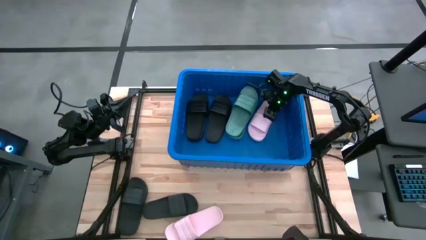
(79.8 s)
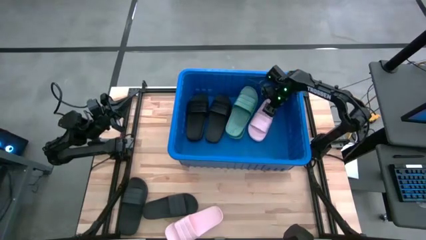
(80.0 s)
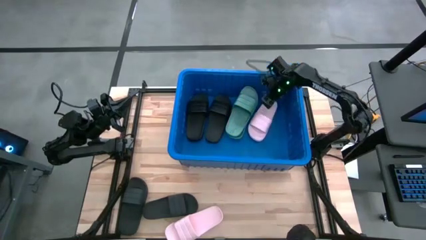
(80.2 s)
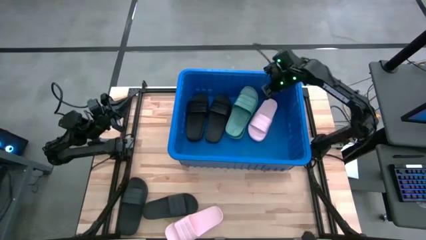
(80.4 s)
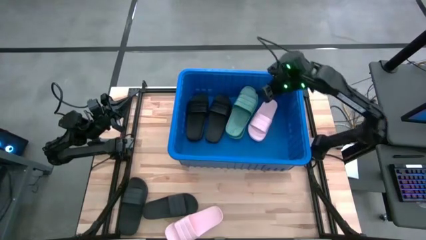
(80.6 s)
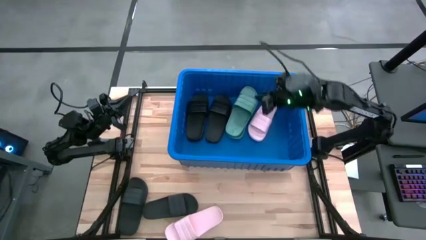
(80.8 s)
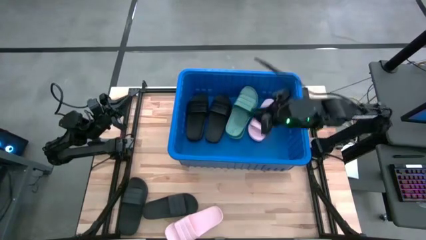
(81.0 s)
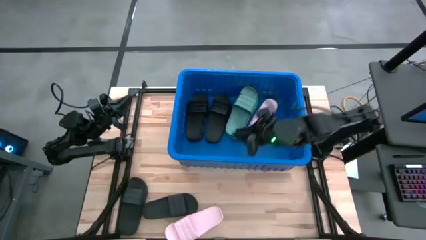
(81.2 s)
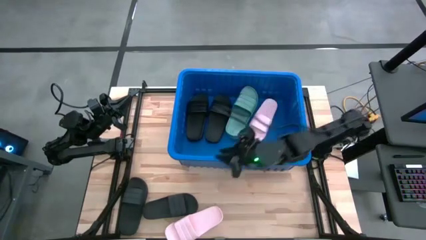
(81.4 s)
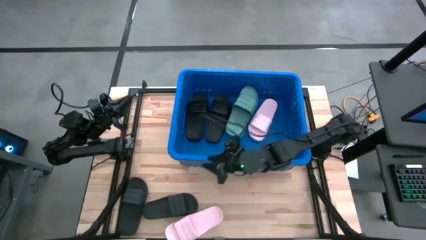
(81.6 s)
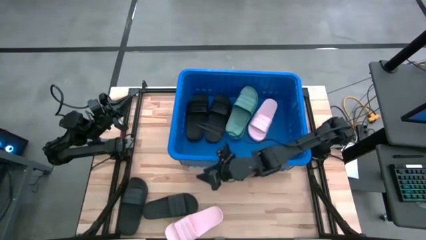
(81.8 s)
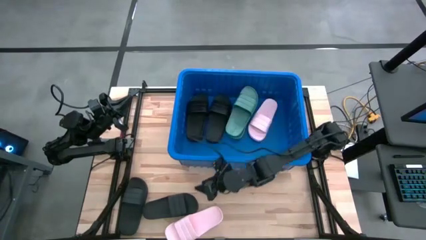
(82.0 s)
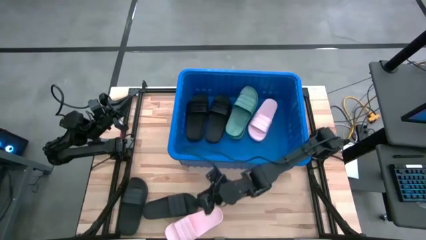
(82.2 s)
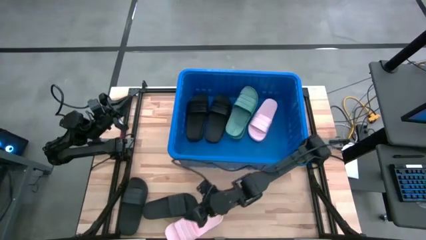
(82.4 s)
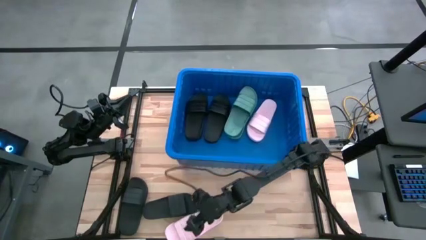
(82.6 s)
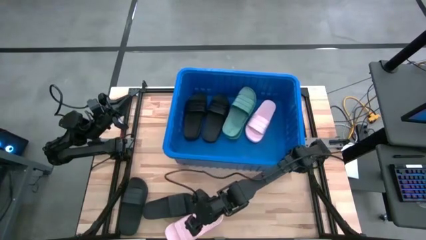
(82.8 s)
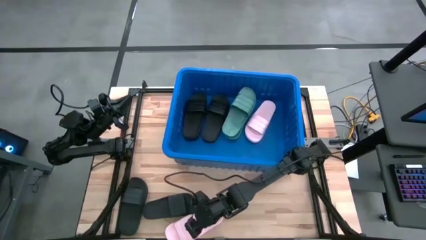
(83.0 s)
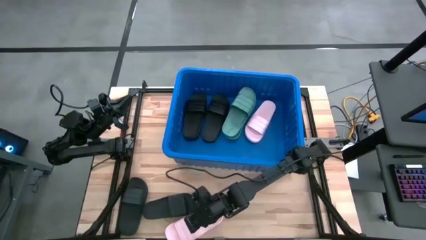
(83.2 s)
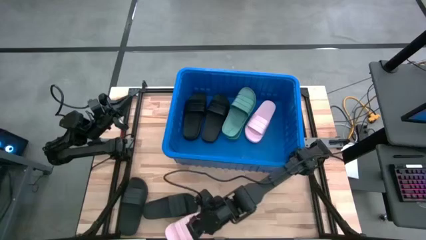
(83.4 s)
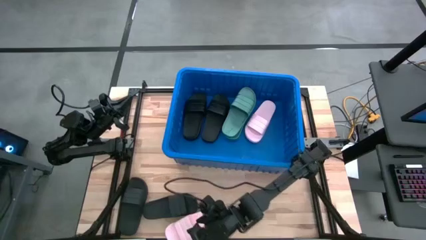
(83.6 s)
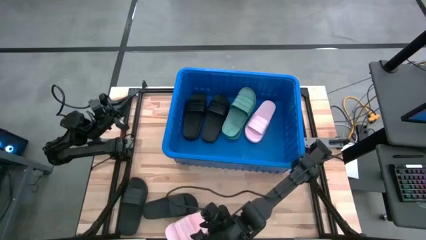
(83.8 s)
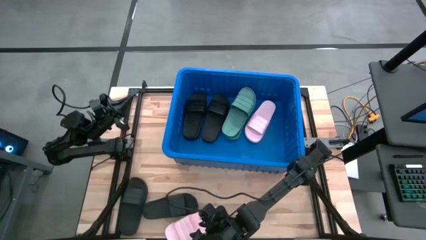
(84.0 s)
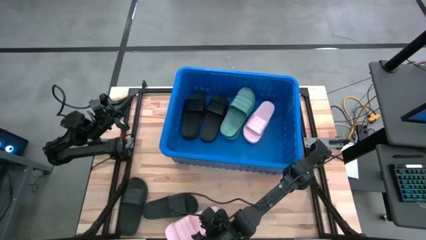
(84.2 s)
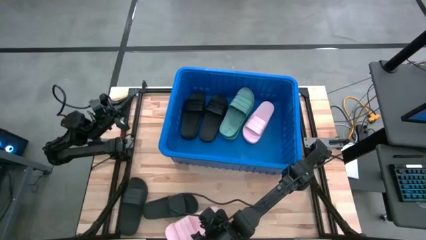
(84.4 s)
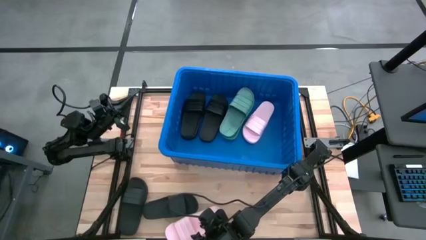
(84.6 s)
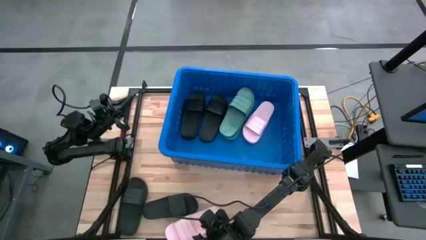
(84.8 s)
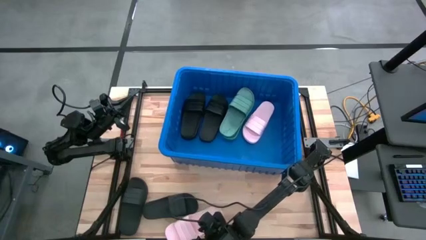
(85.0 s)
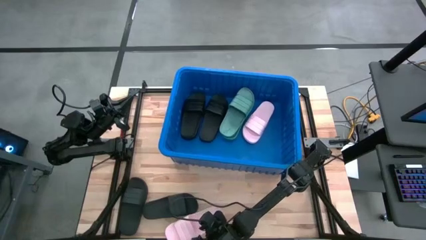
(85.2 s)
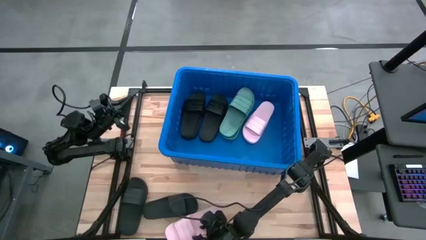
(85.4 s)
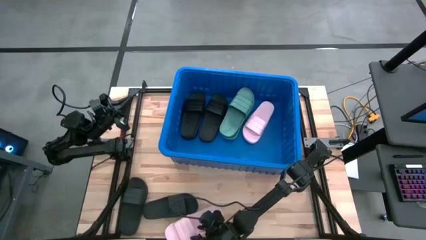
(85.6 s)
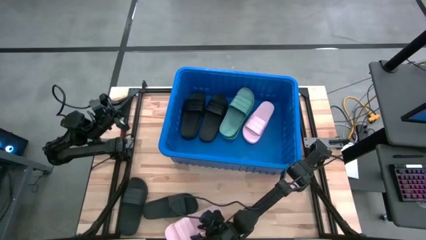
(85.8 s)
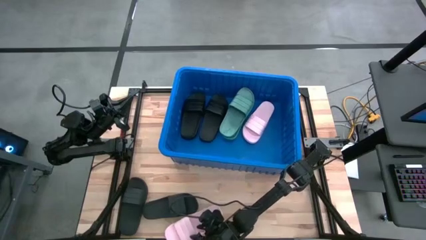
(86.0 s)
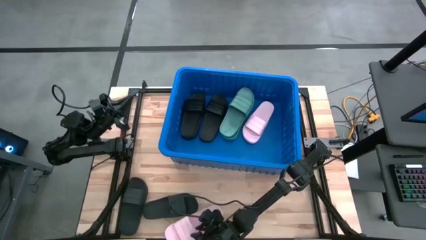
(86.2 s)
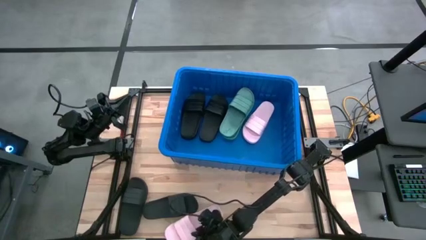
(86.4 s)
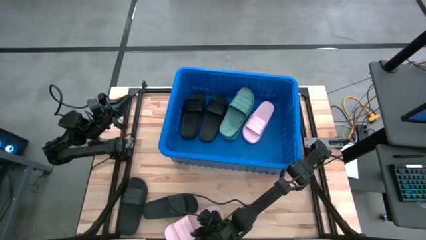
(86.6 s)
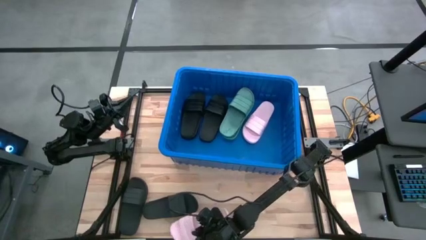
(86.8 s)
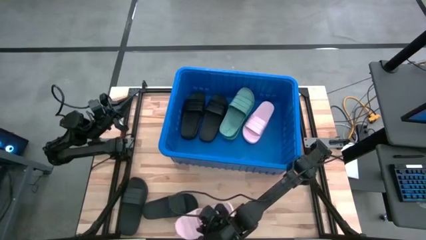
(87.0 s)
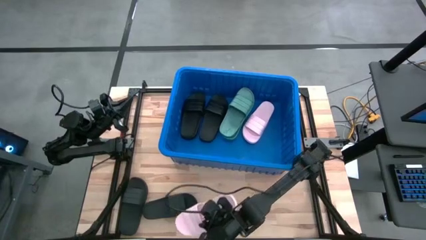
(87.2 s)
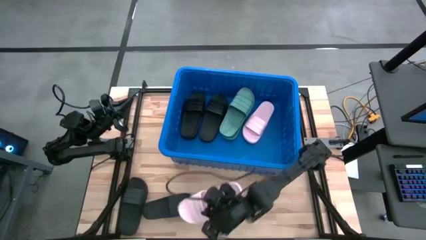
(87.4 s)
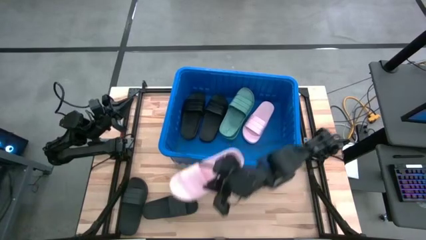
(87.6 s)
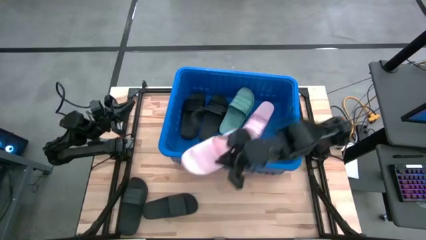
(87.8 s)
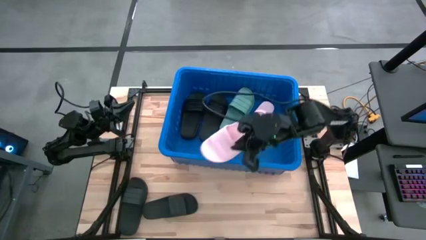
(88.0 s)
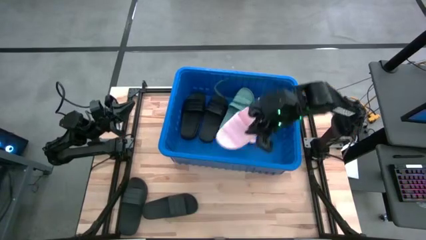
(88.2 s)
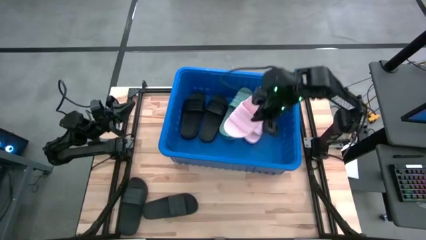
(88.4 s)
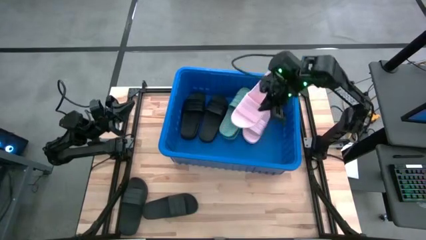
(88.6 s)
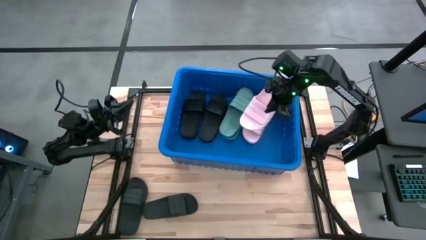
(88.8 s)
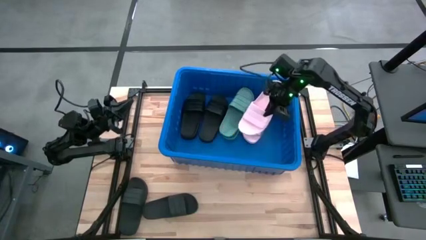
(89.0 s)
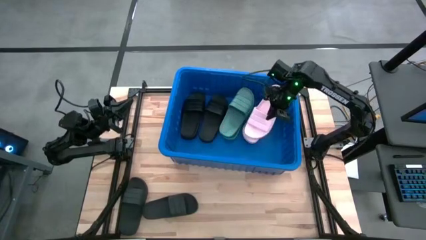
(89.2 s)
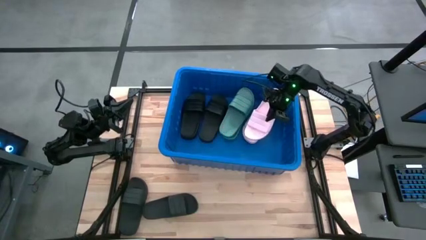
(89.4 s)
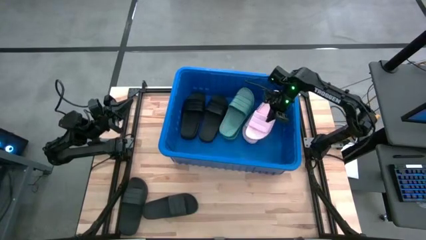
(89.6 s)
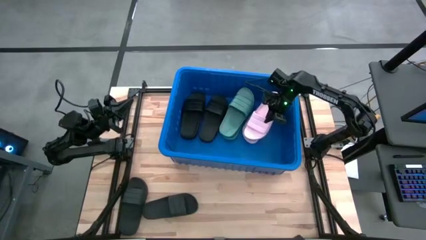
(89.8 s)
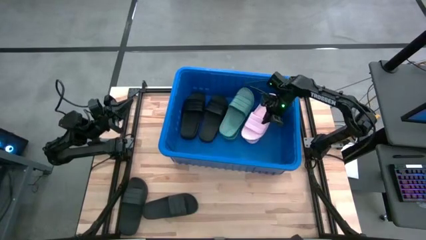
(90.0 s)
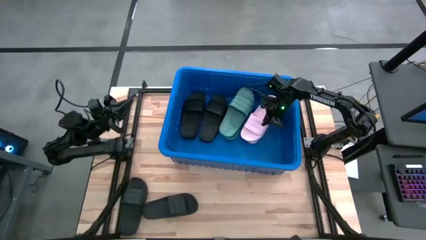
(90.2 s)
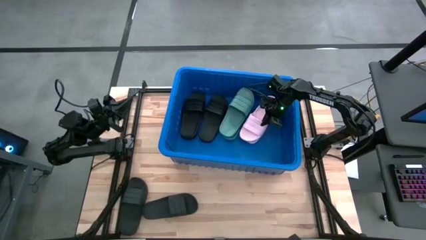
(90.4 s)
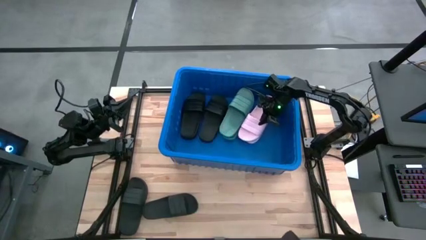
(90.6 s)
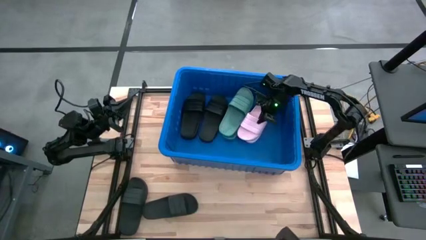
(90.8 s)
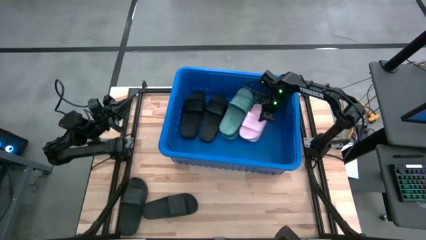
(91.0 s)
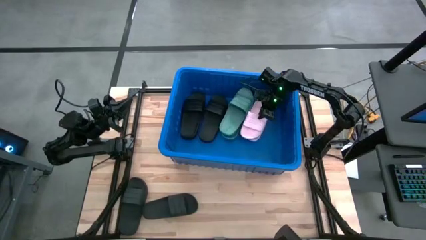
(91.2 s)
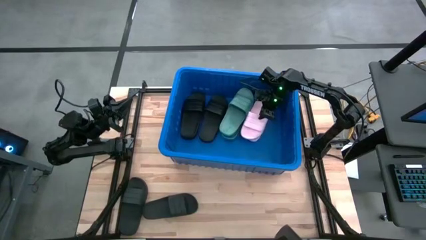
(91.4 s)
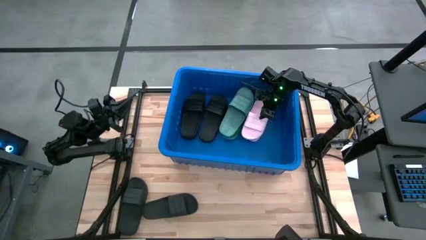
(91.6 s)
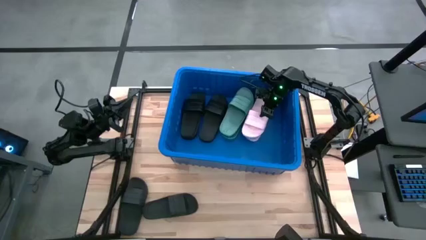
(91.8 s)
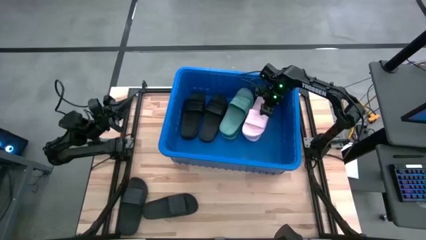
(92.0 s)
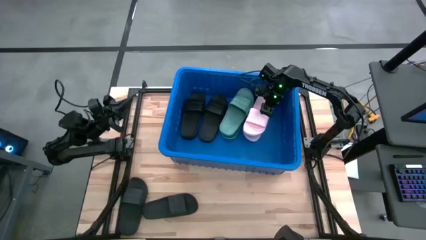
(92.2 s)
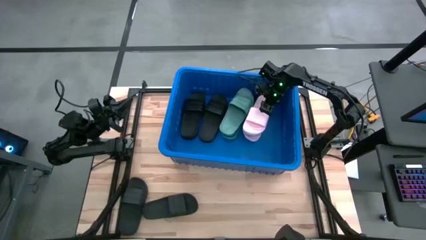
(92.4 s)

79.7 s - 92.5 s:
Task: Pick and place slides into bin
Put the pink slide into the blue bin
